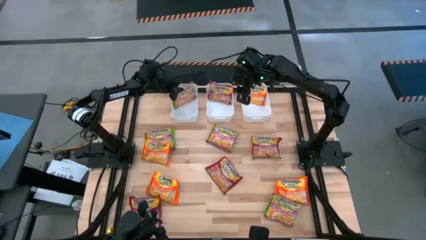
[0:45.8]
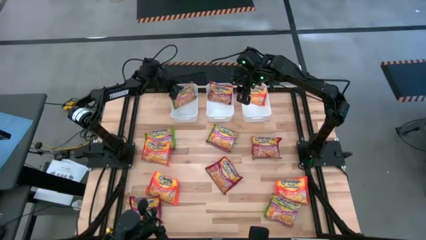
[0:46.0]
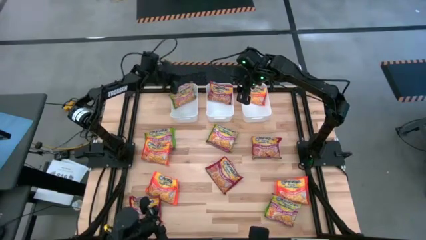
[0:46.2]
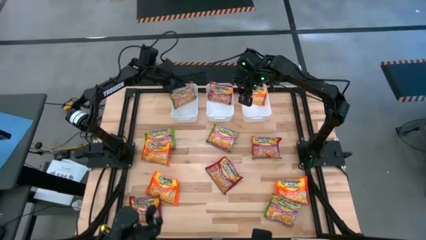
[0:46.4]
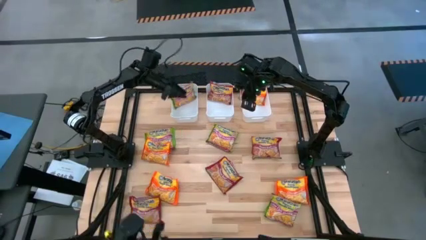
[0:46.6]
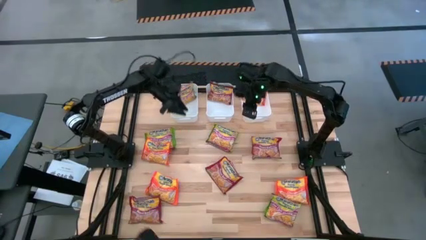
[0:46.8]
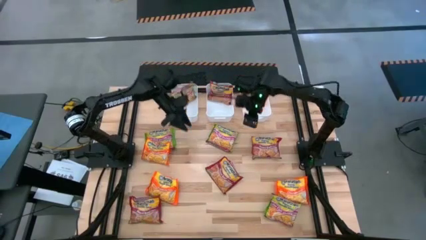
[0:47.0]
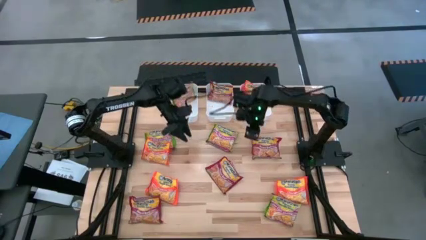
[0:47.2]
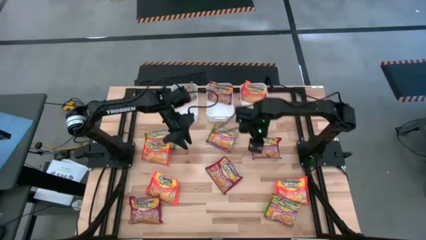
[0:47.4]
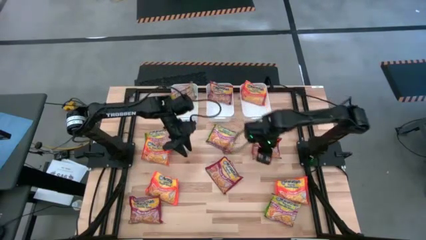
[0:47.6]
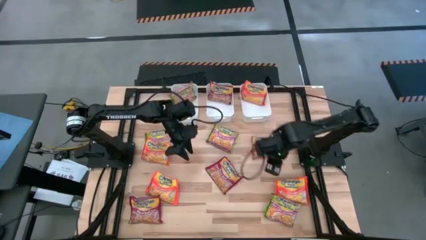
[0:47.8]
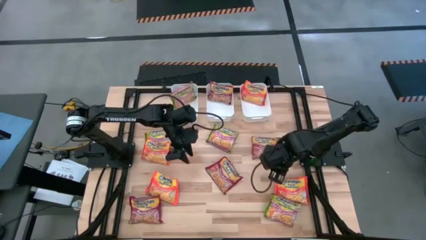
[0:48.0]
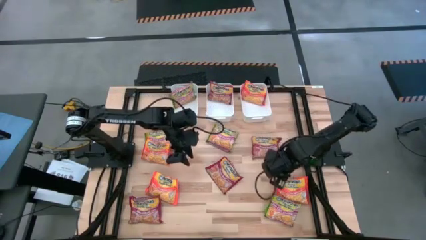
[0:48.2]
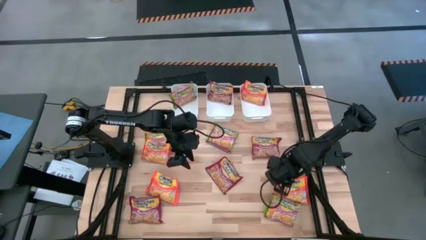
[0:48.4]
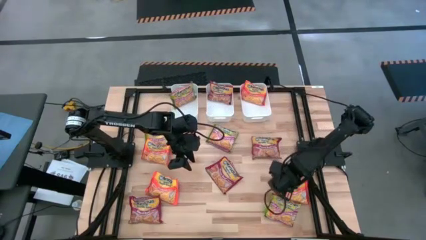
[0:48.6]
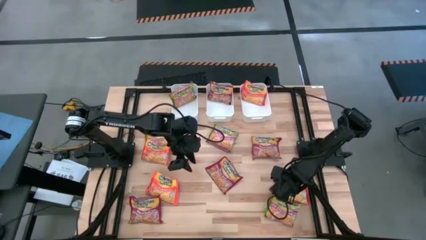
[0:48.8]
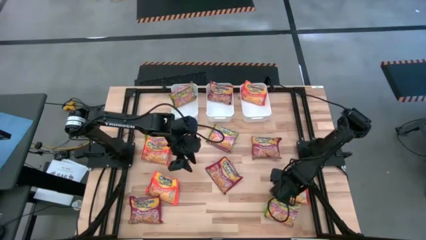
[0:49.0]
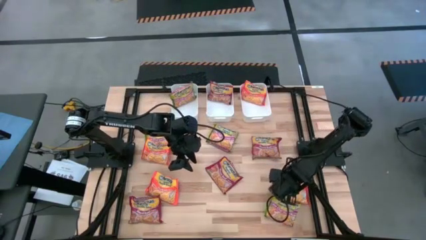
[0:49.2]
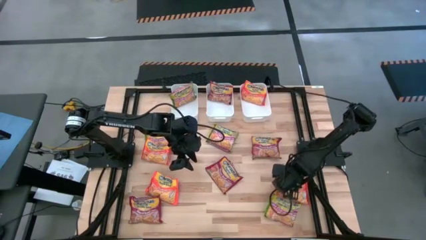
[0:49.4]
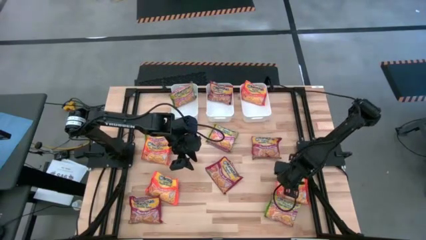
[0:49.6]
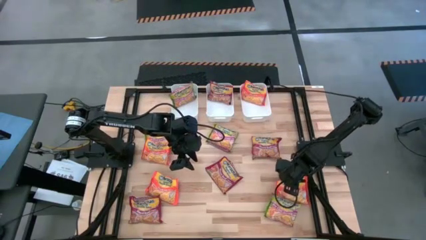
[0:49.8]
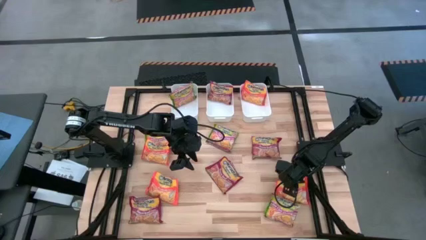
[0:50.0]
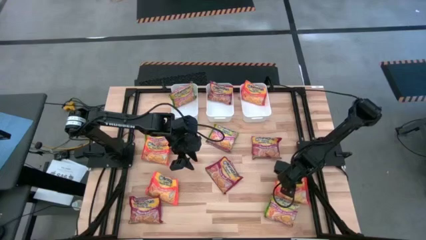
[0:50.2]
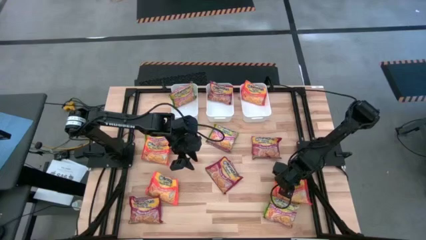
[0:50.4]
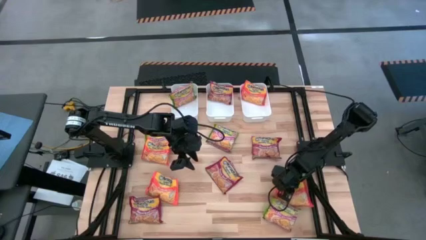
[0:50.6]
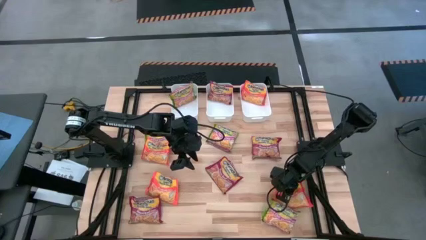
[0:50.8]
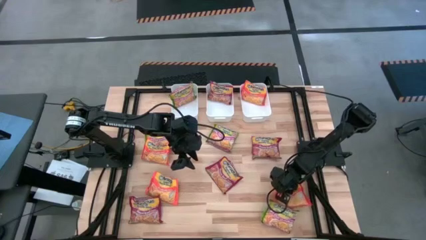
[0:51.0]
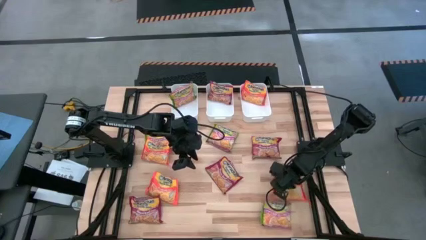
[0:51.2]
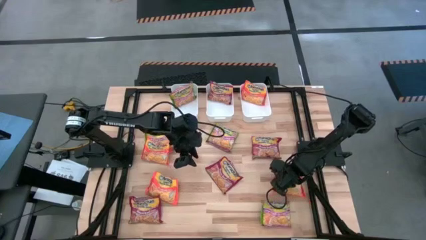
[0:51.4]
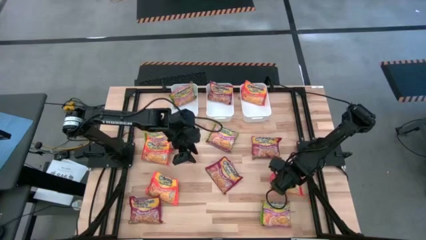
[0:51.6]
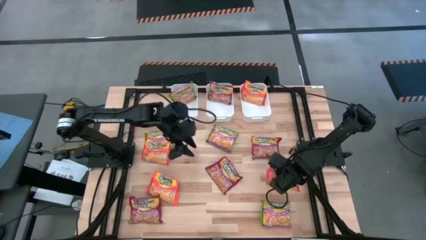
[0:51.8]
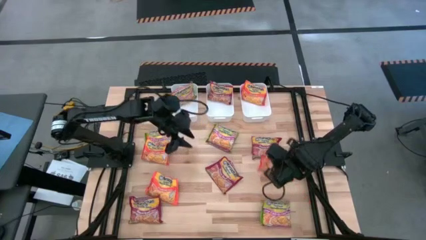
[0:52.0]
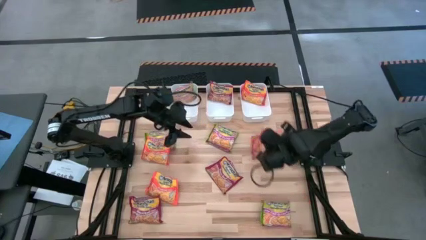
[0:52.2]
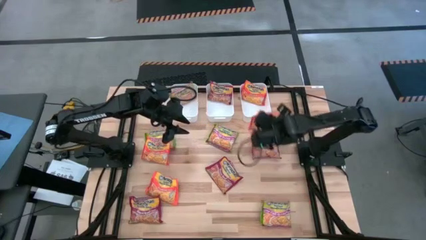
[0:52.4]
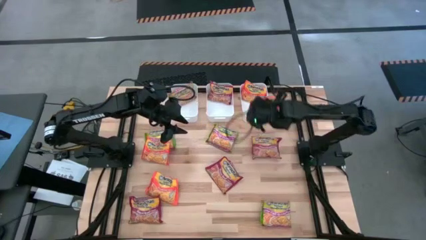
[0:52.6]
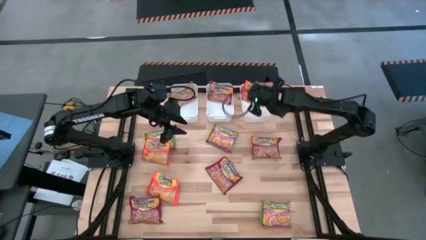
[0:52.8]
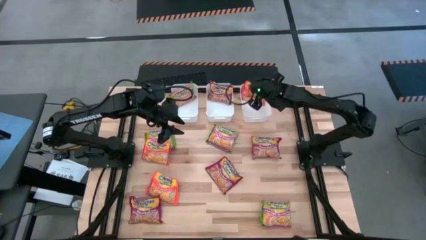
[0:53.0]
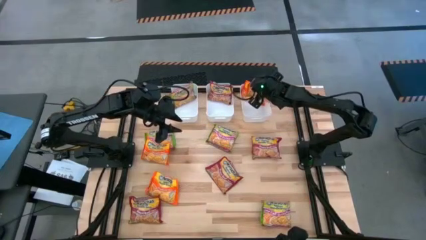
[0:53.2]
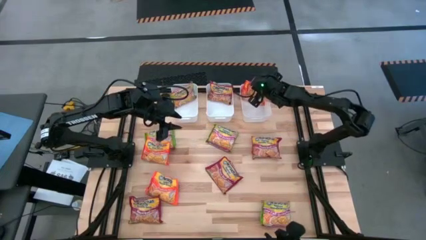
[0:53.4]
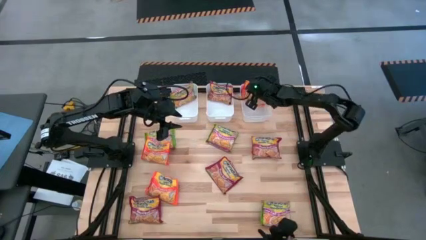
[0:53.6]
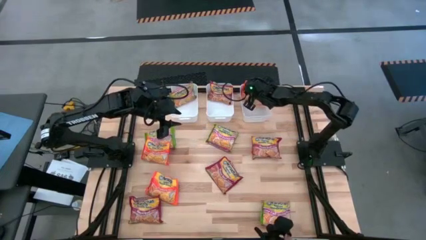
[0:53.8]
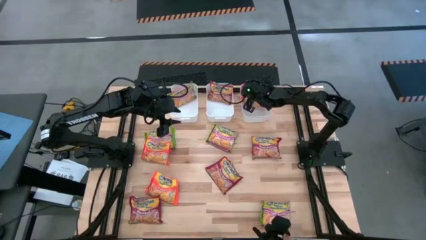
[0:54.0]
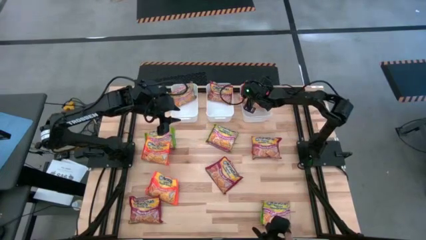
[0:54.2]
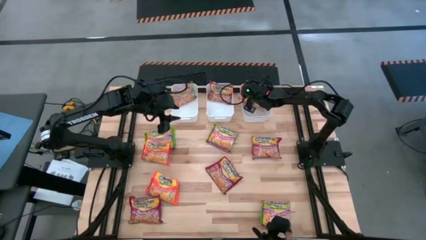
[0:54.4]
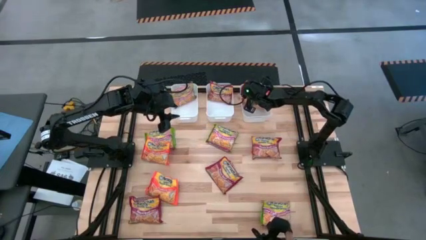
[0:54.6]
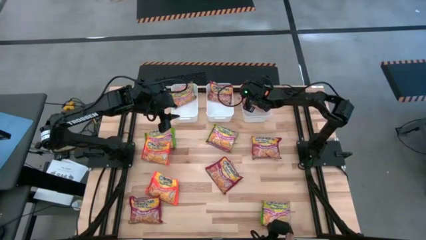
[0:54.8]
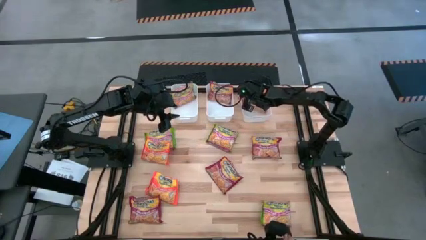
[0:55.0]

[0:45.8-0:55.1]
Task: Sort Maruchan noodles
Put the orange noodle pack into the right white bin

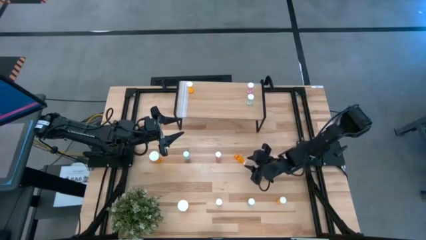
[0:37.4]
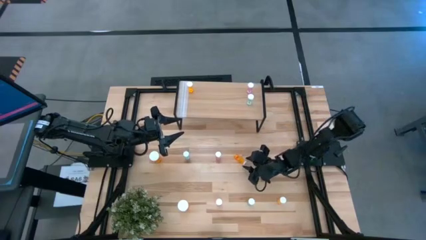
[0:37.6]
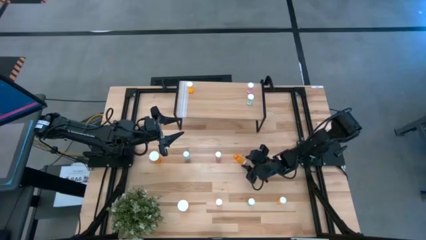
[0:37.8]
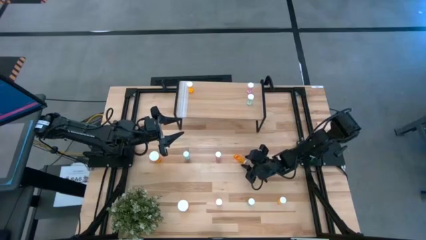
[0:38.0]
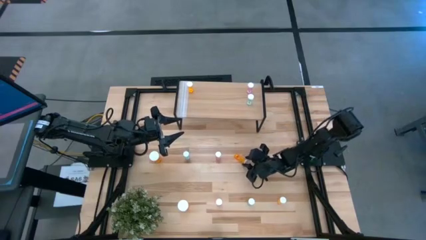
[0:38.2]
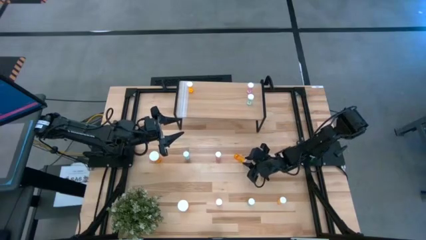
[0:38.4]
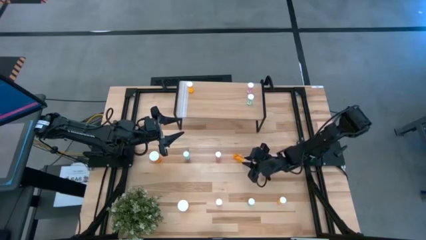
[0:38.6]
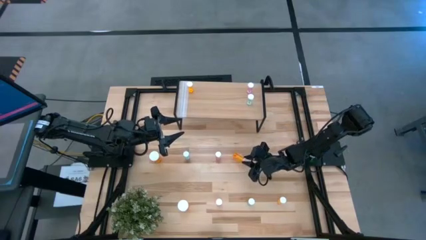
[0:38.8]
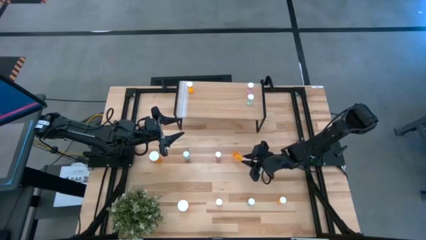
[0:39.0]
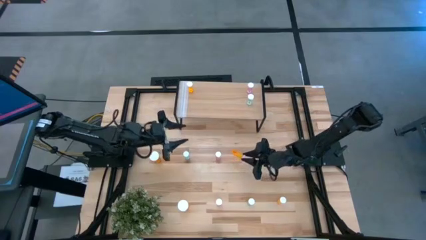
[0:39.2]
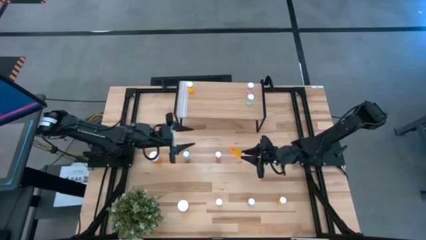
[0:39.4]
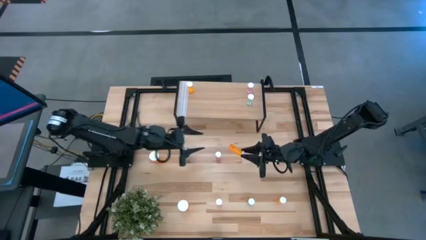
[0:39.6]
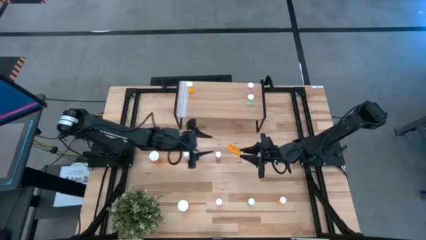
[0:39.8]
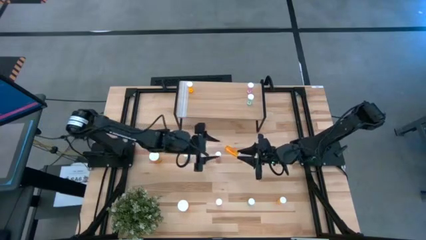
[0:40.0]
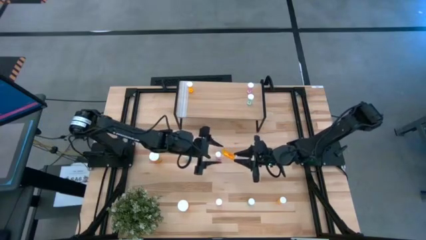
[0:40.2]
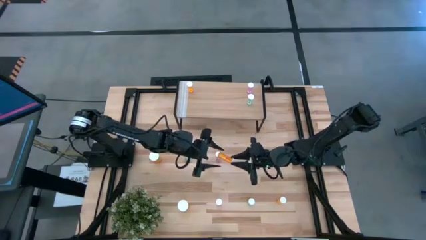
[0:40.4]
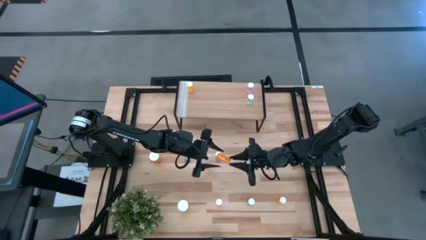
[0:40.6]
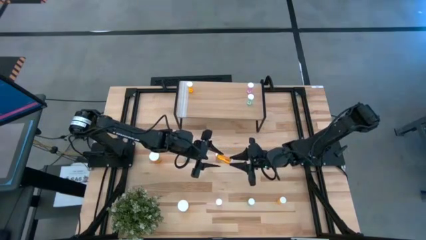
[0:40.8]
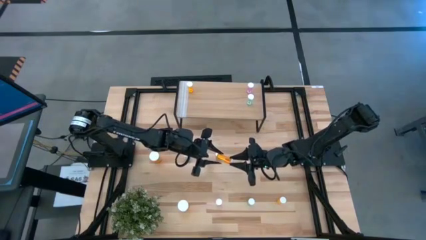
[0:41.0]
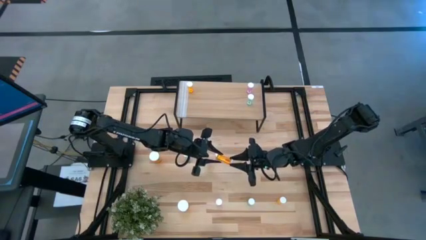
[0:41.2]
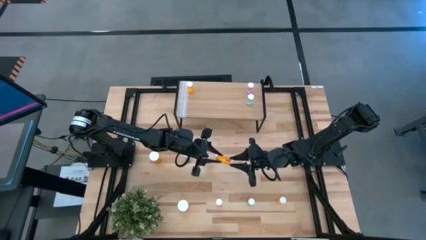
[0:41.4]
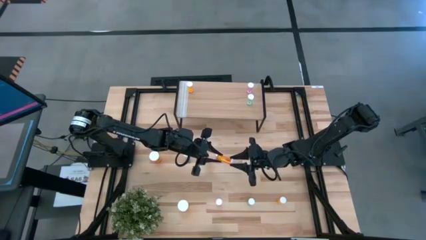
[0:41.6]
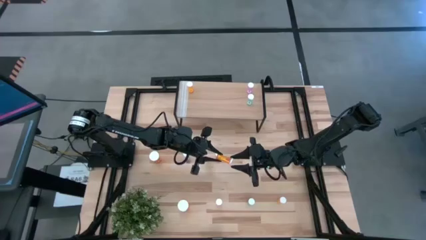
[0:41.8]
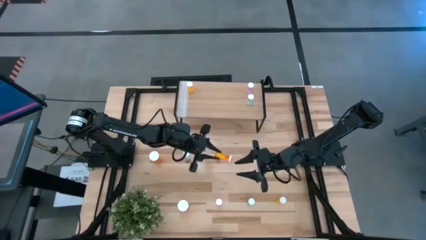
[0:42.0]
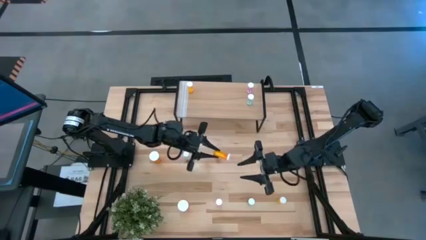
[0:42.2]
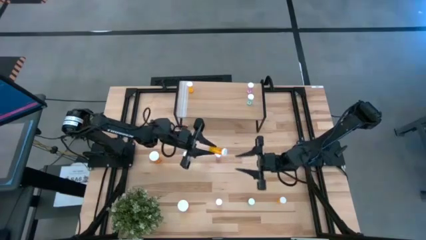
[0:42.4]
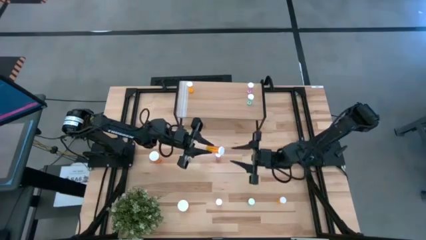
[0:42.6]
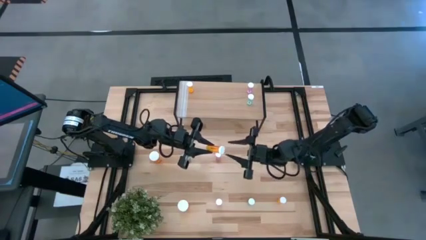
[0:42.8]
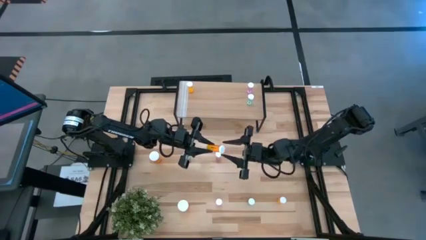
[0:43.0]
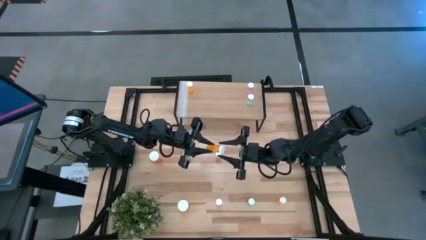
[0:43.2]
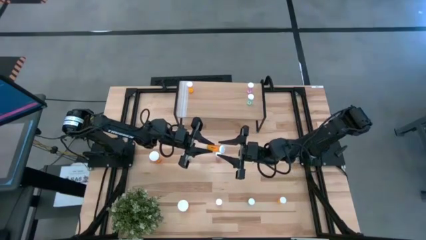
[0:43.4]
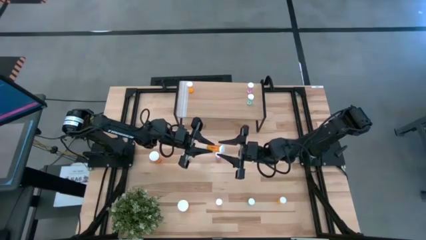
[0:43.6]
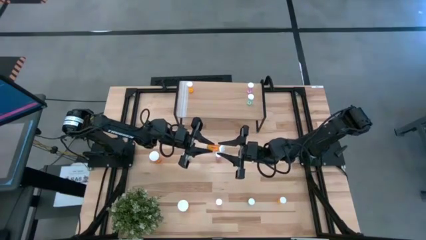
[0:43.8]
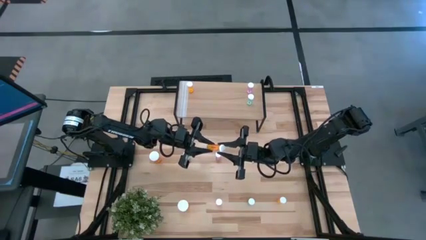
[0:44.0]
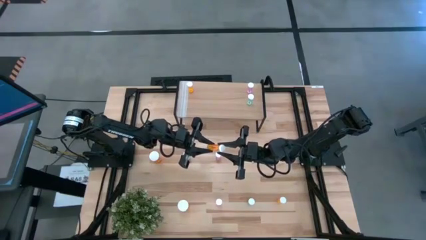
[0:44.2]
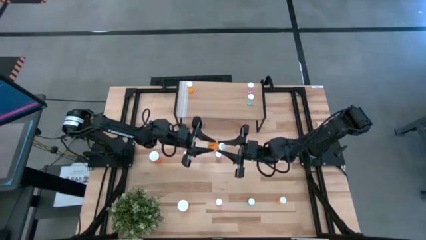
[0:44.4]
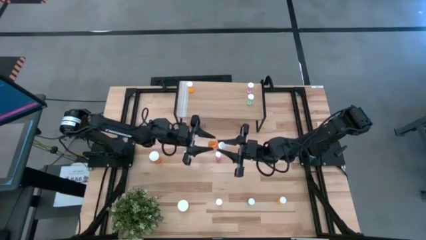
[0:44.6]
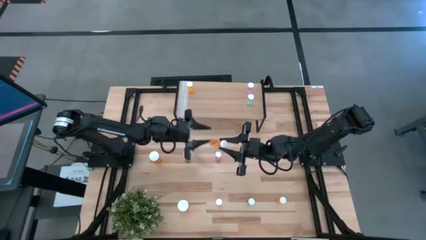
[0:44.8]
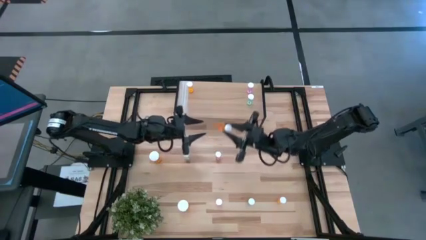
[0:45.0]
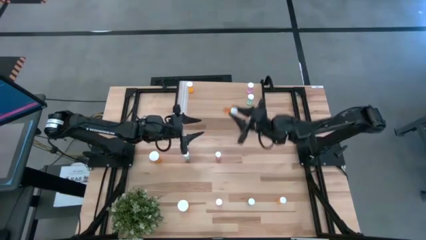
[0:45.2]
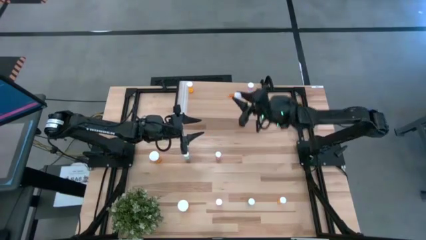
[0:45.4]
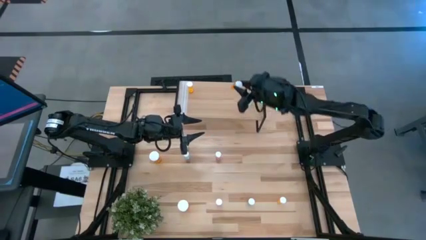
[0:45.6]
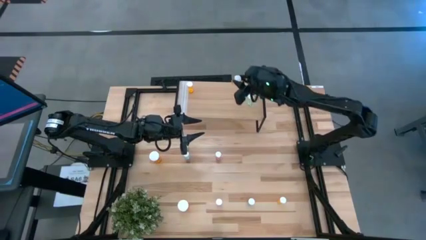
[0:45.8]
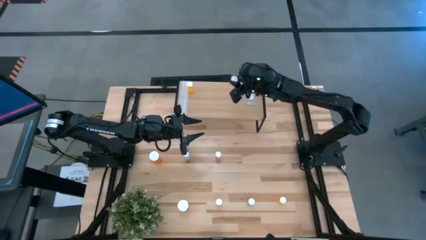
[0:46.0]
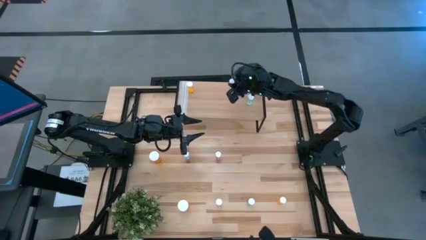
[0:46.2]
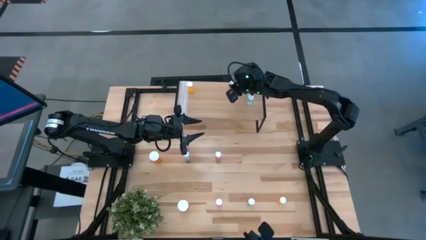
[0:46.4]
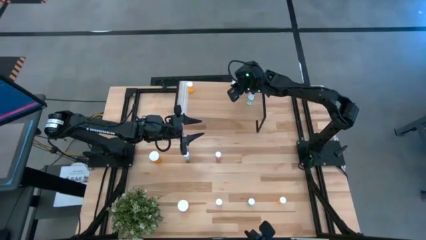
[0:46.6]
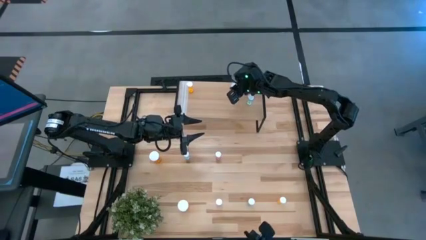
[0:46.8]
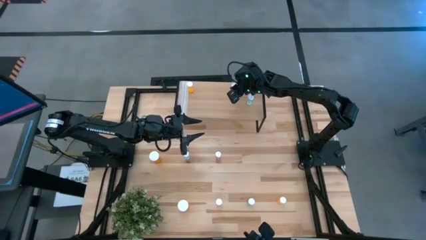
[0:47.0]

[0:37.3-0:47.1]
Task: Pick and place medicine bottles onto shelf by color
Put the top orange small pill bottle on the shelf
